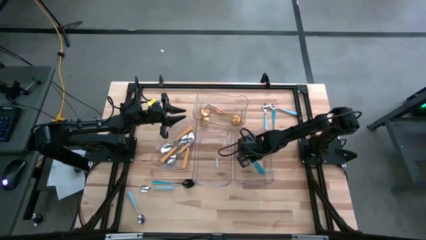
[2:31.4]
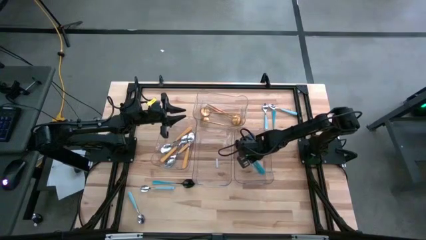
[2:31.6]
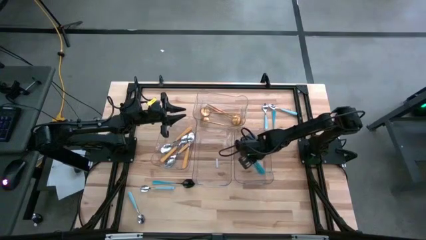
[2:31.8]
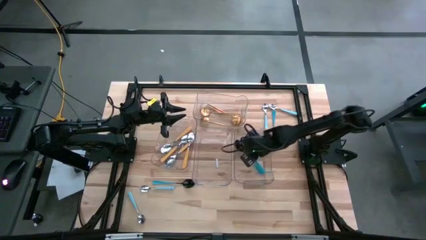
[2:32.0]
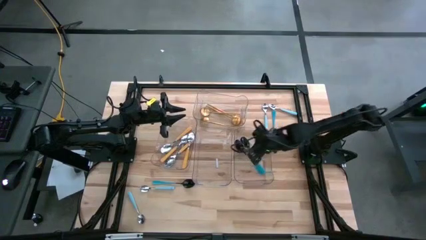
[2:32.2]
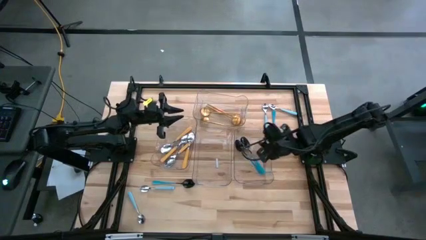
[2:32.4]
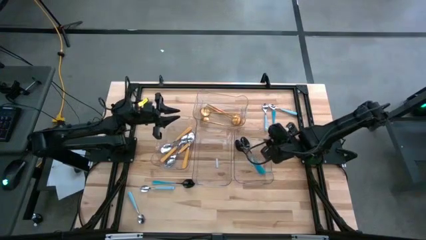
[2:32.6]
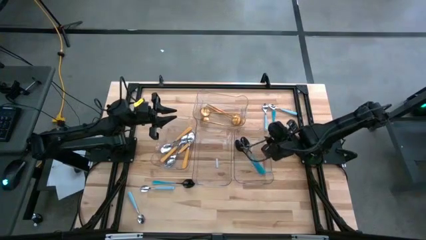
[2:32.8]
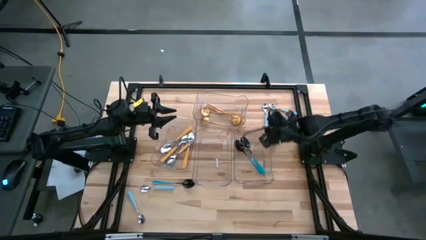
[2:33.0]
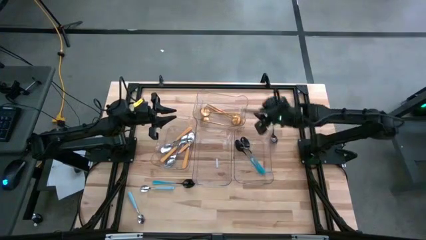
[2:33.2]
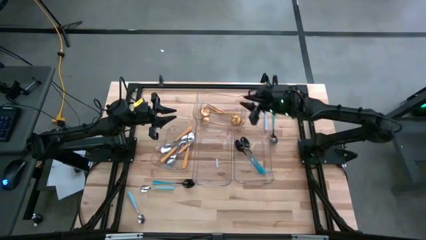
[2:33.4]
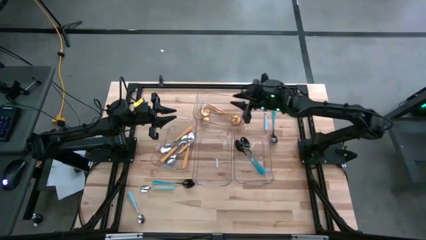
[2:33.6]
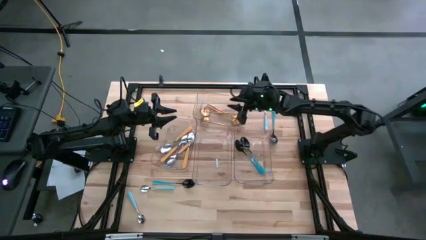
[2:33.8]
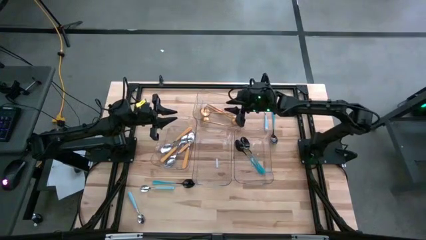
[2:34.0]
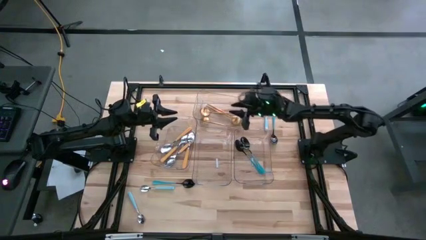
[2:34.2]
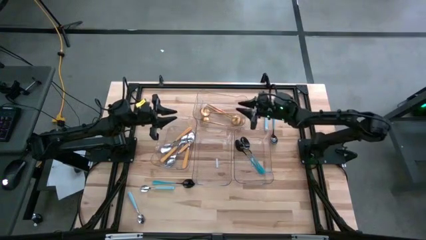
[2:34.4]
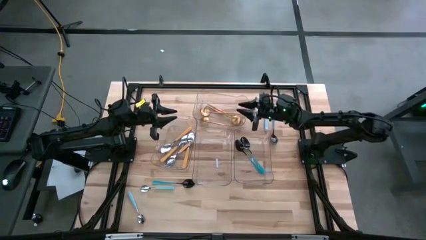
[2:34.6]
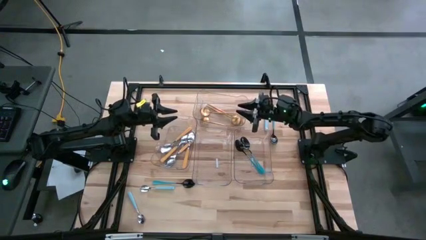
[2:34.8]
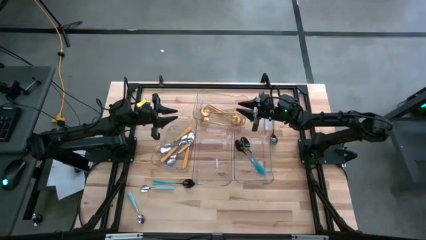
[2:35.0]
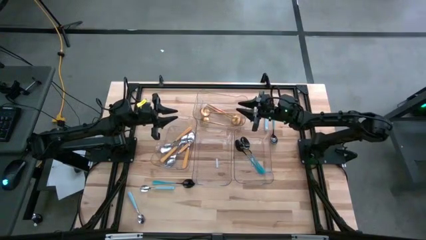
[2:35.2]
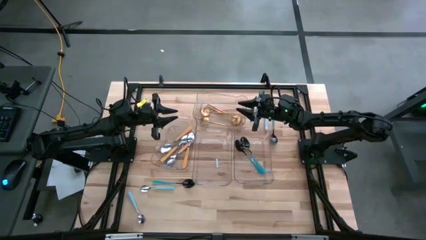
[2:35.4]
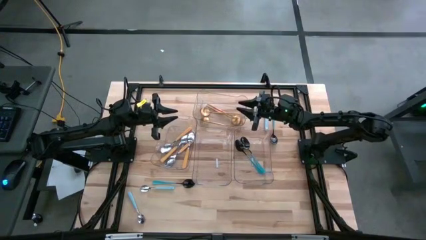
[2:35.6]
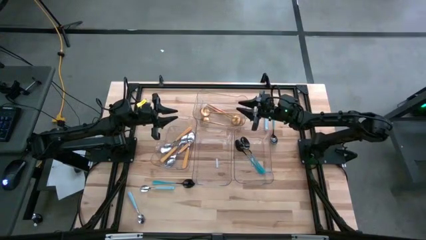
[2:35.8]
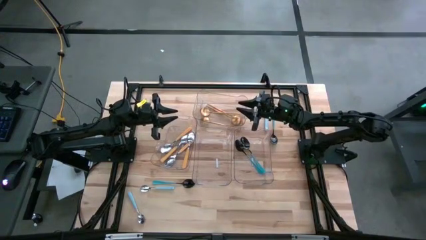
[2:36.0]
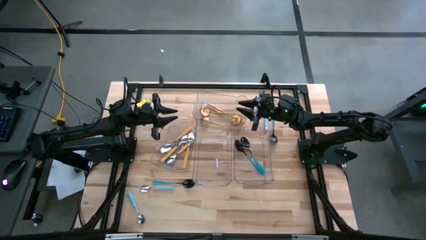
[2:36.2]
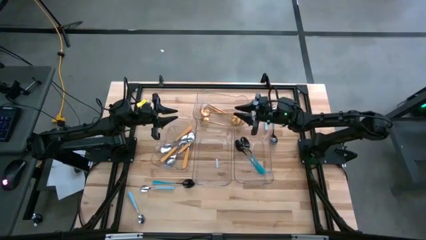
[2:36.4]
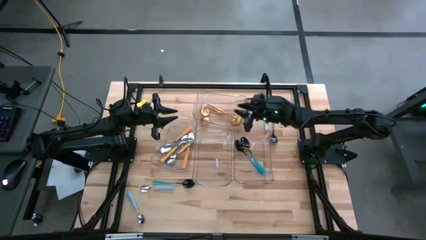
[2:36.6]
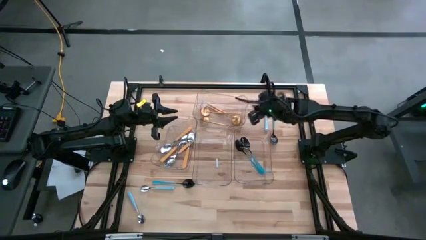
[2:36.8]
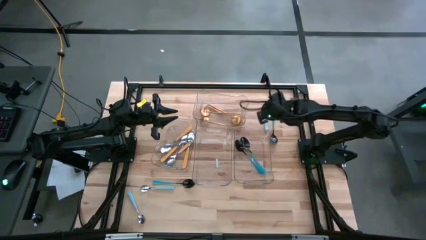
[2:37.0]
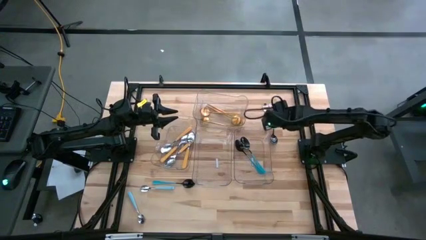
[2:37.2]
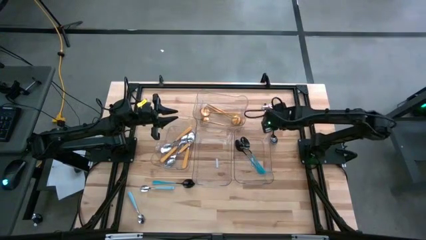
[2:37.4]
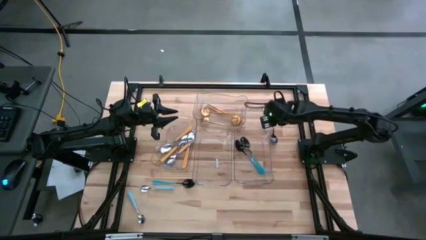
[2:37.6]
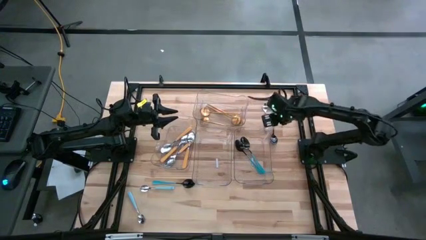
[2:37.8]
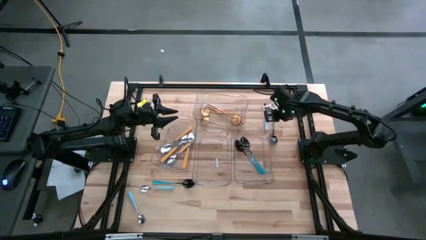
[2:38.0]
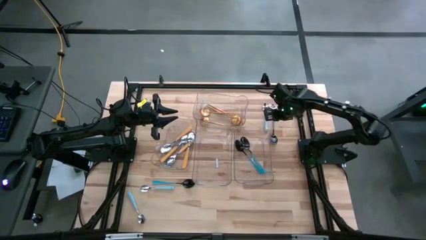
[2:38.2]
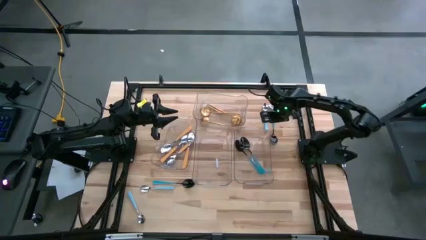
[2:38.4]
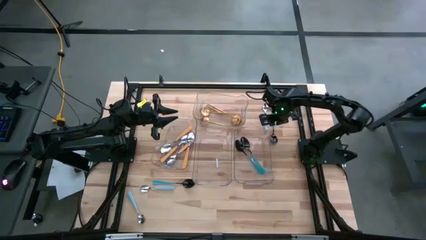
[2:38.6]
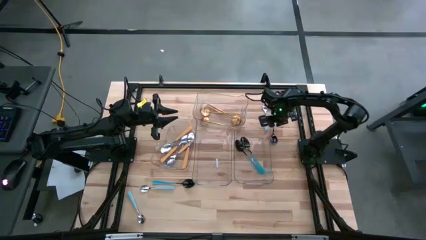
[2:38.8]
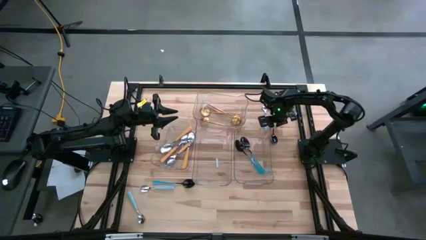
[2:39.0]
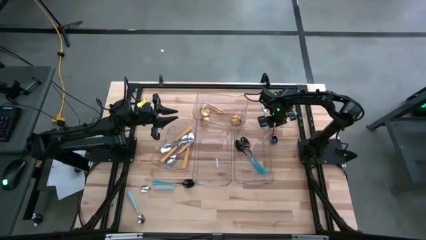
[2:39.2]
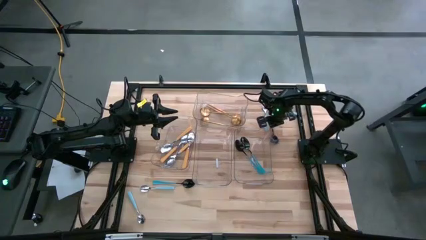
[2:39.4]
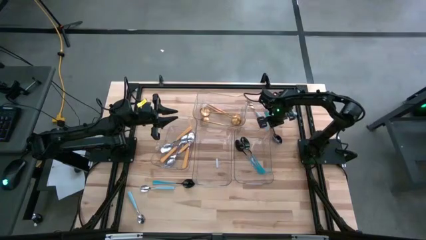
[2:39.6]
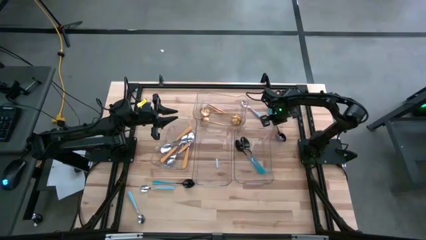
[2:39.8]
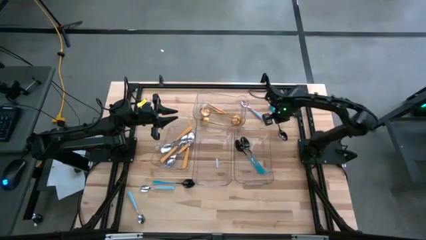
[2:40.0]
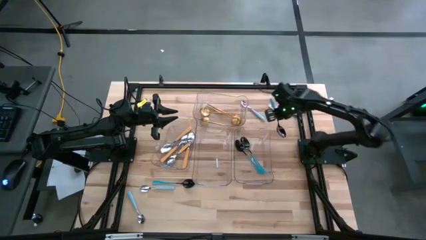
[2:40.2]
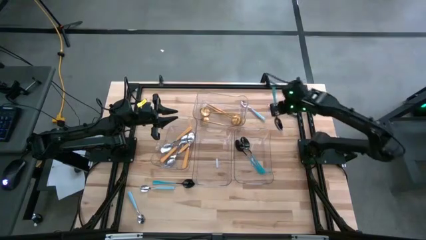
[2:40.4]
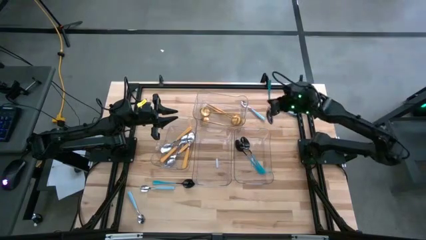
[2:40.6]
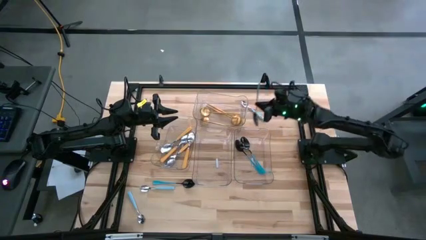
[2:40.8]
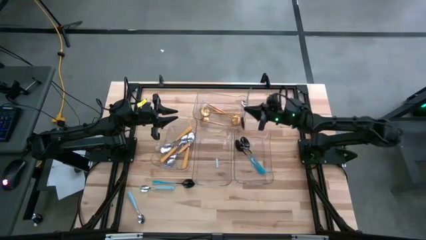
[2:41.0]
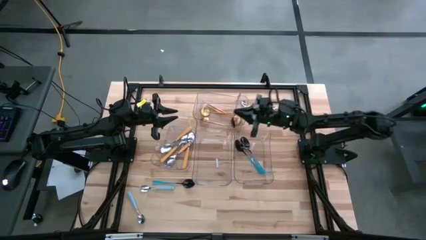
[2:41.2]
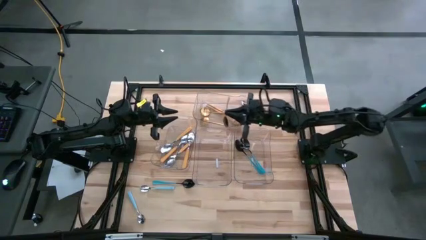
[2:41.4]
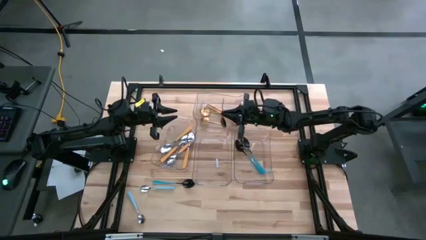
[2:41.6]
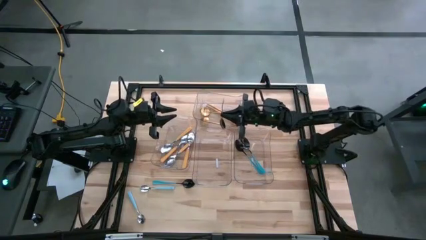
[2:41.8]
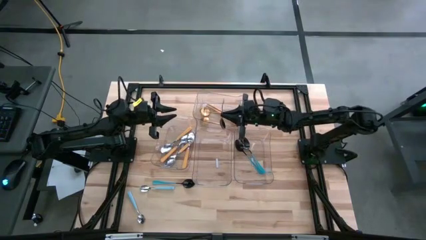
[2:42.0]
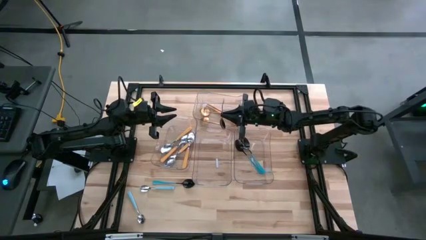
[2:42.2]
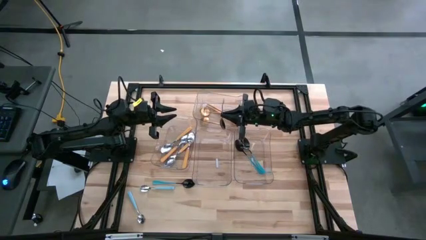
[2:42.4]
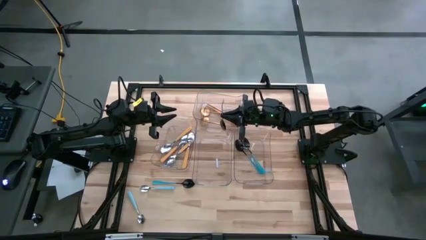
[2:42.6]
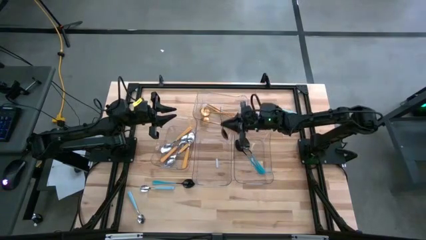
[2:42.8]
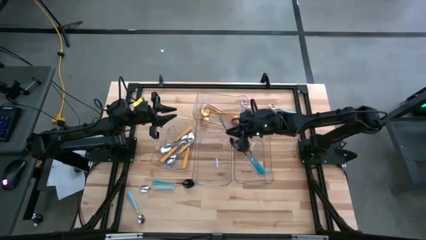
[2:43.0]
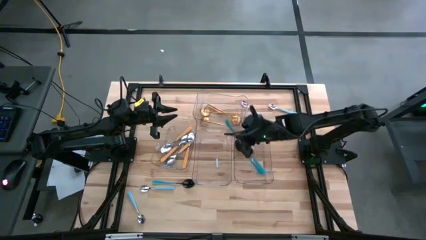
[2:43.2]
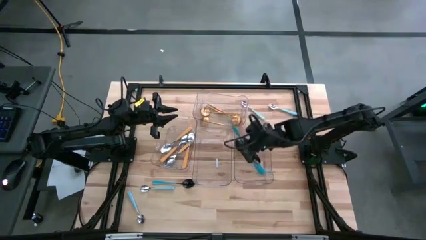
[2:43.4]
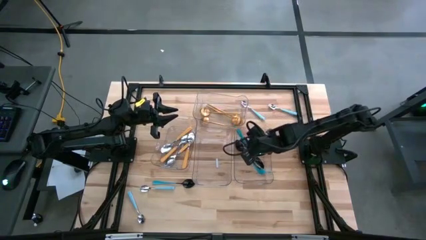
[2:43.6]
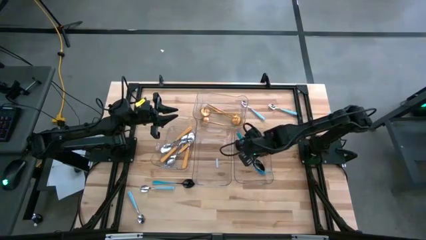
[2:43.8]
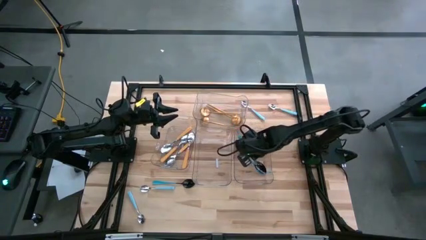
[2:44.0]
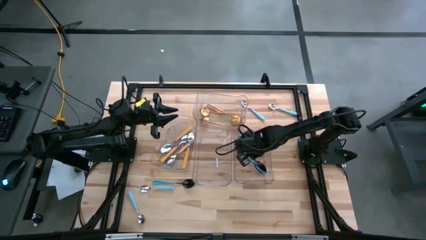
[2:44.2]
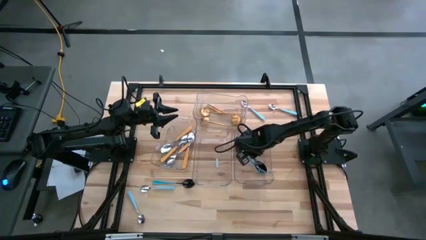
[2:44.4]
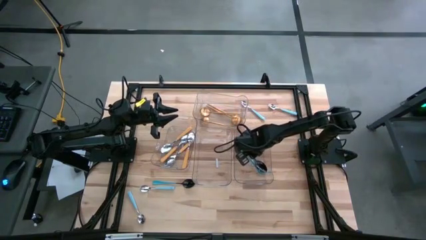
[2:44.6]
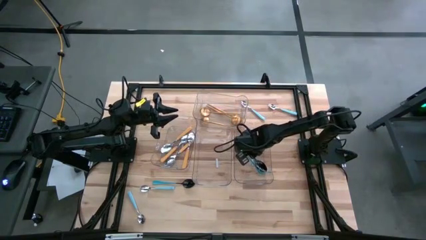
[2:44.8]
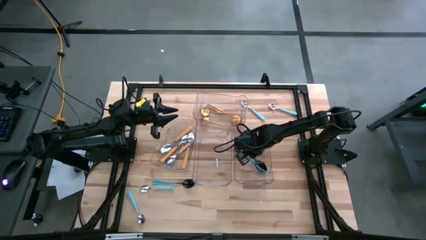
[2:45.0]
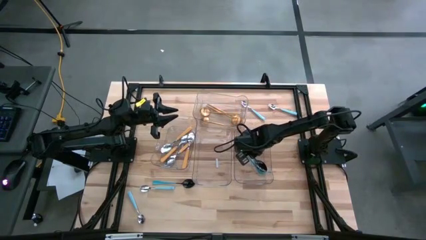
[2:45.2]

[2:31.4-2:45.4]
Task: Sort silverware by color (type)
Put the blue spoon into the right transparent bin

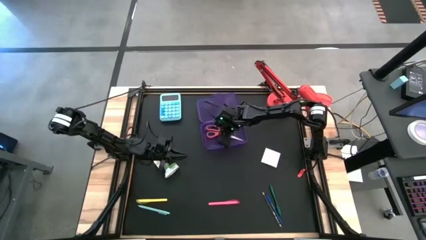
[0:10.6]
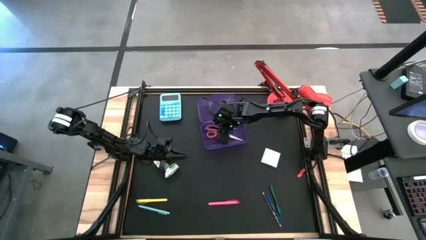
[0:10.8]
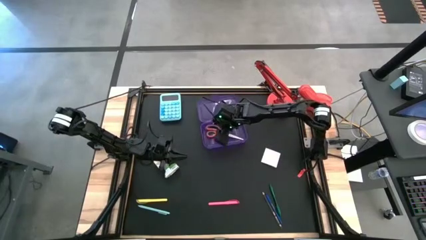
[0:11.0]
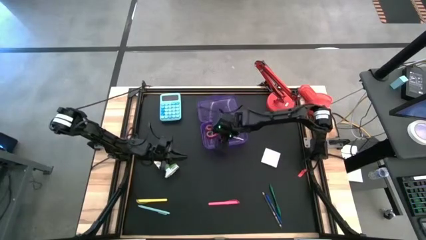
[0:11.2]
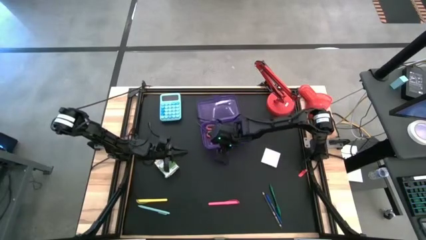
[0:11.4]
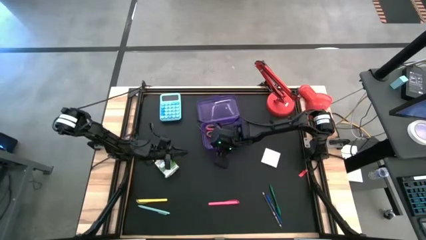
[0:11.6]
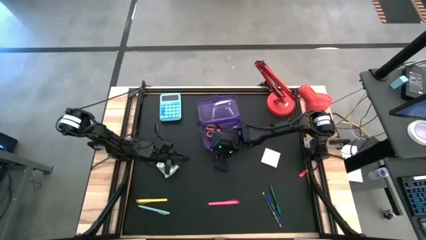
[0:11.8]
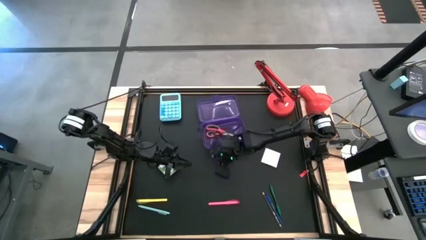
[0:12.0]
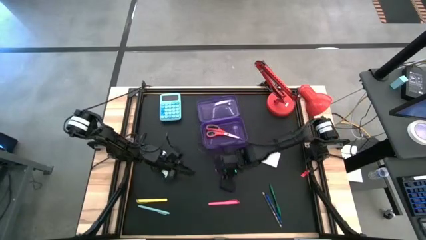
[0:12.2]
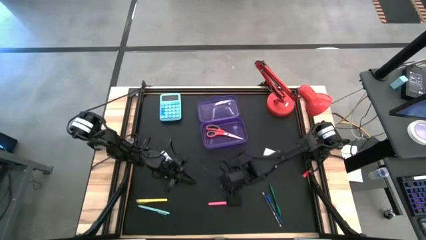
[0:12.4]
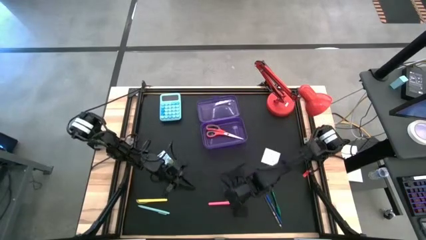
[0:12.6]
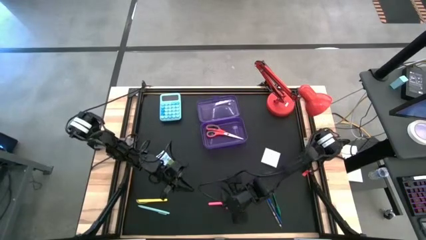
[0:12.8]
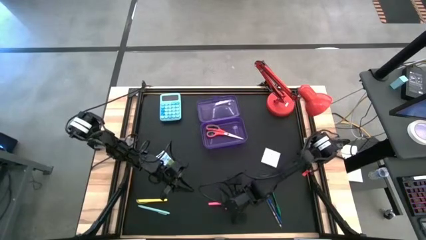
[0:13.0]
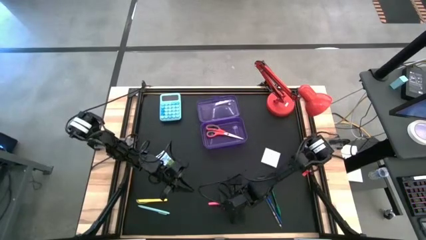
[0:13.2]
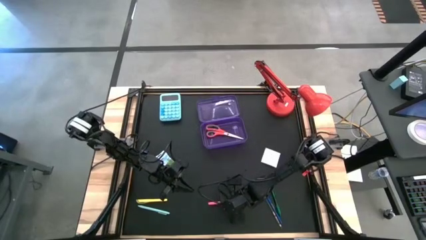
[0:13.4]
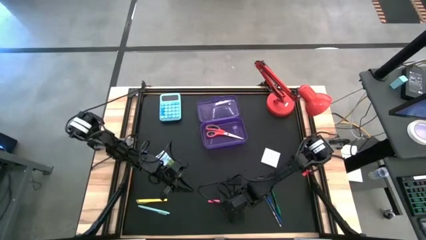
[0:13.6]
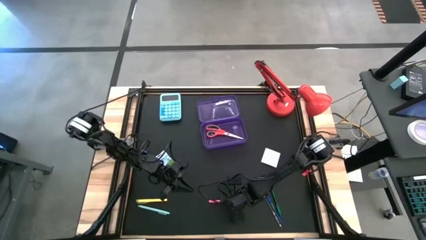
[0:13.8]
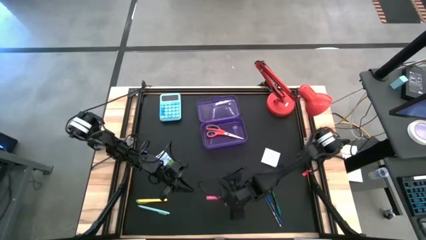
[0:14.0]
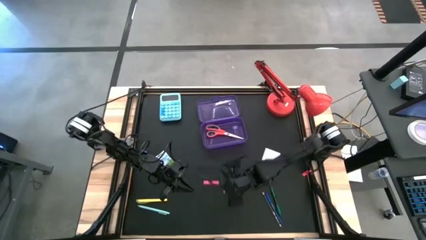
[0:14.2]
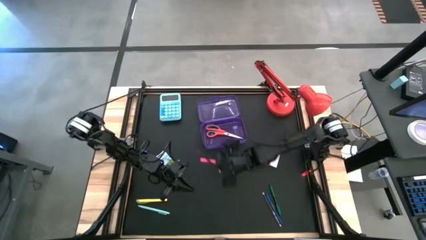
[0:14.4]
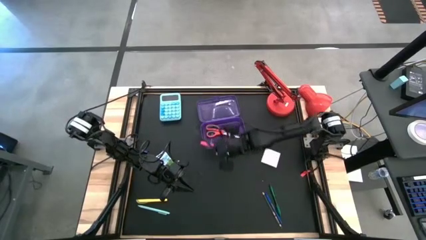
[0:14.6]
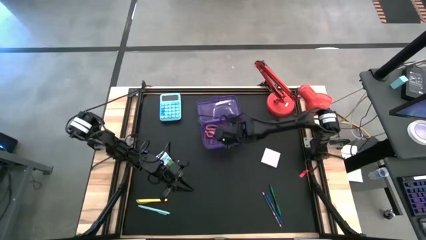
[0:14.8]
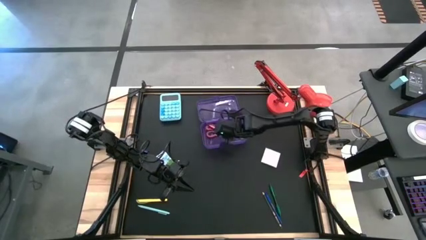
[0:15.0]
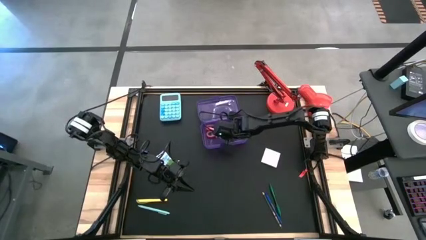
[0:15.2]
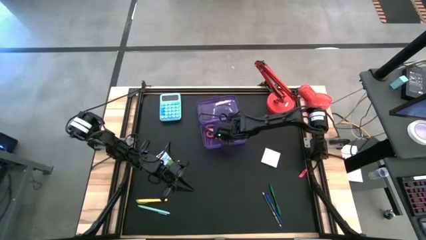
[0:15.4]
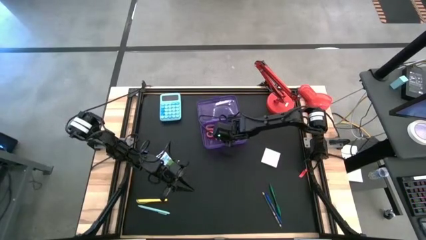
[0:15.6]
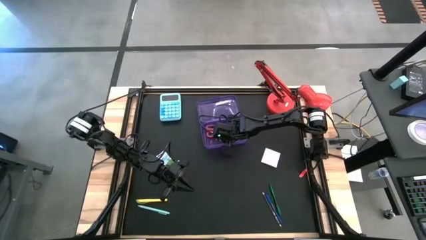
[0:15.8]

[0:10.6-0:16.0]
Task: Pack school essentials
Put the red pen into the violet supply box
